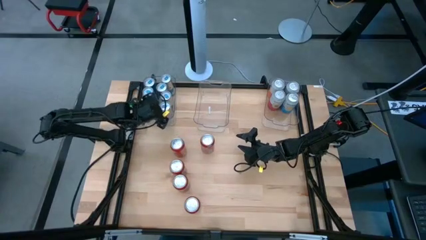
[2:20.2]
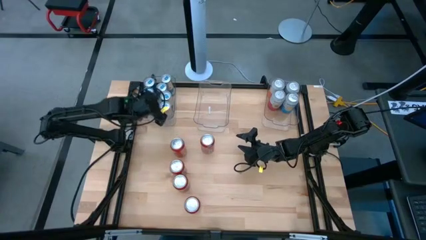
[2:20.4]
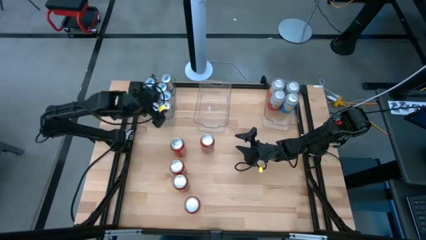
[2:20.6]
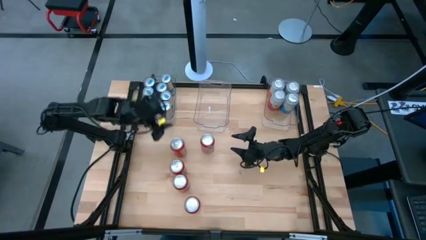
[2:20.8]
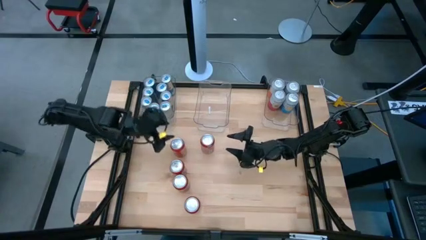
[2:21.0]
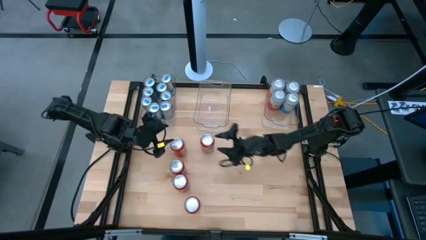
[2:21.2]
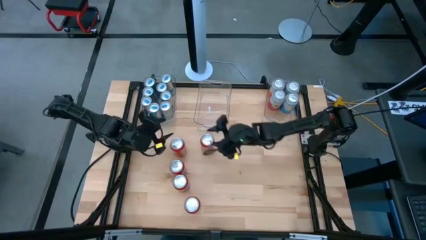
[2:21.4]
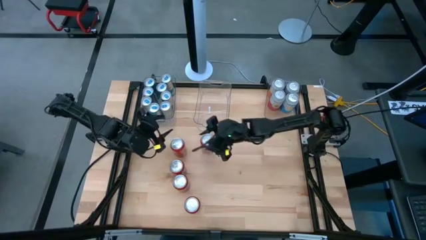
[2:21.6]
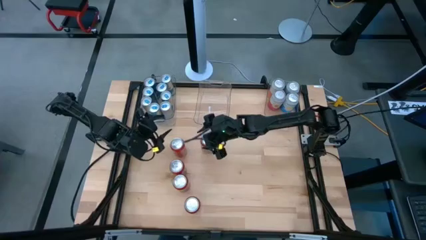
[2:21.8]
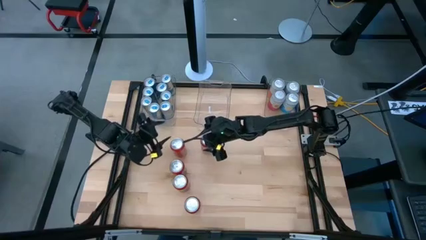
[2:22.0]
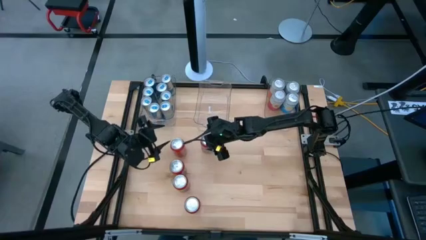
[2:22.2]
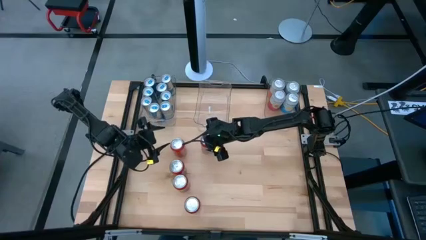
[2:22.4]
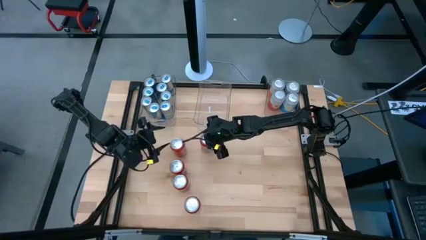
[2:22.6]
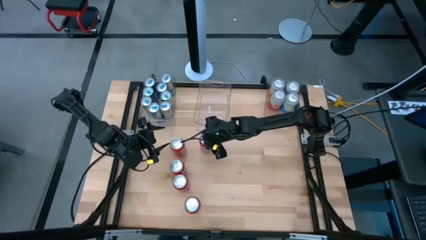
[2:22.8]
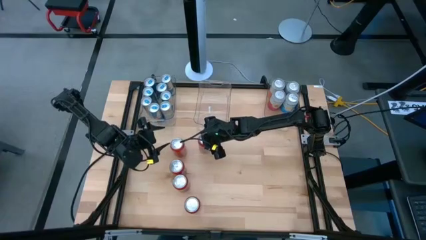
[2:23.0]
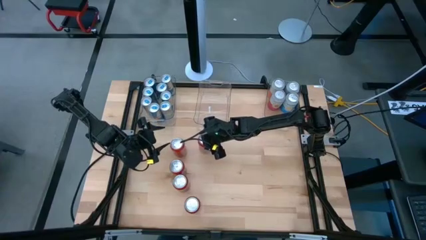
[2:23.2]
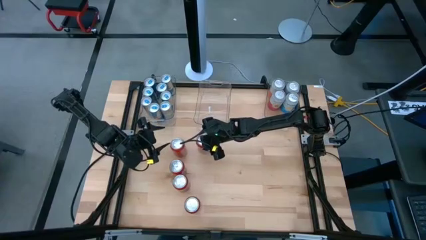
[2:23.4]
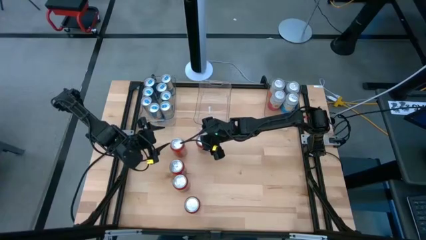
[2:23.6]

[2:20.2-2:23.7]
Task: Sort soda cans
Put the blue soda can into the left transparent bin

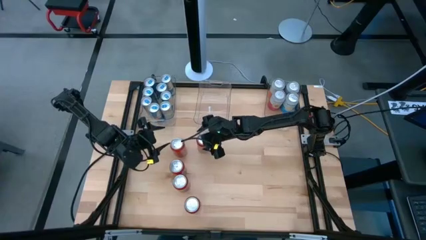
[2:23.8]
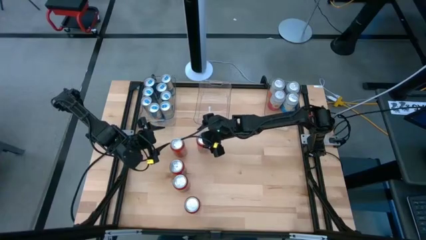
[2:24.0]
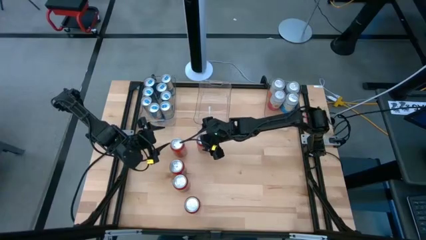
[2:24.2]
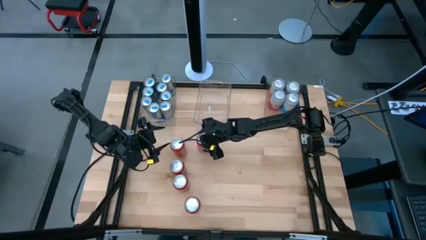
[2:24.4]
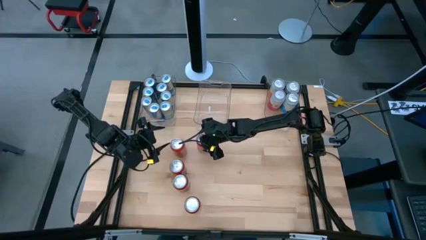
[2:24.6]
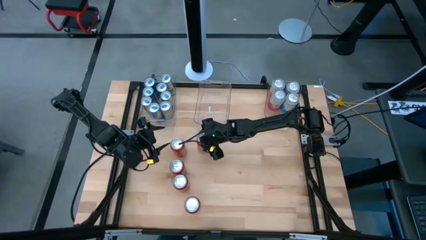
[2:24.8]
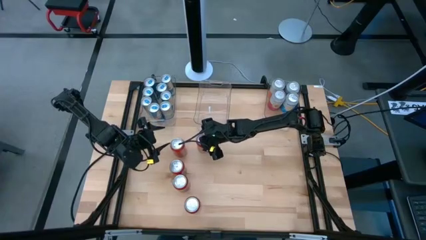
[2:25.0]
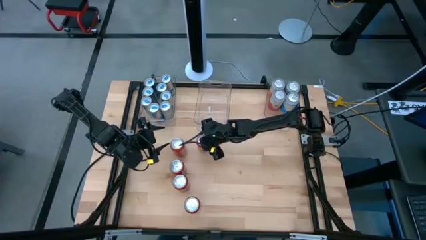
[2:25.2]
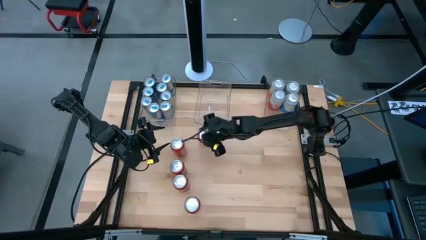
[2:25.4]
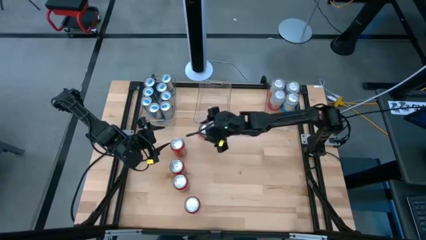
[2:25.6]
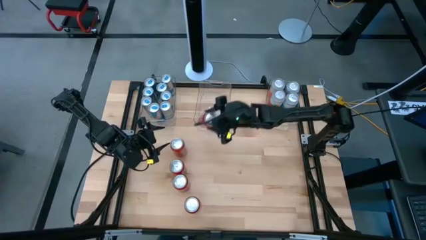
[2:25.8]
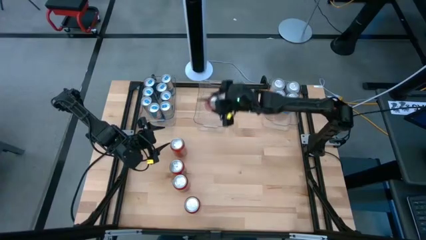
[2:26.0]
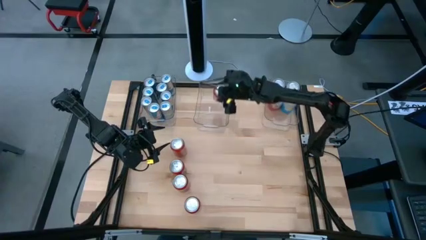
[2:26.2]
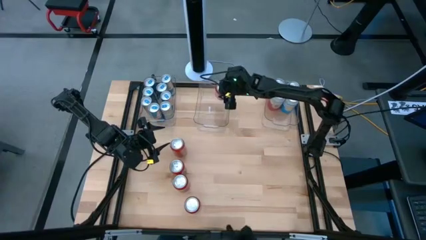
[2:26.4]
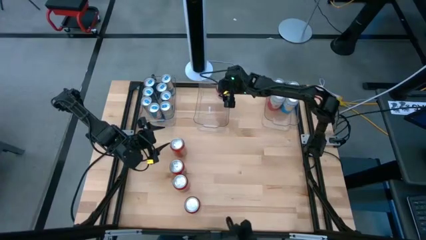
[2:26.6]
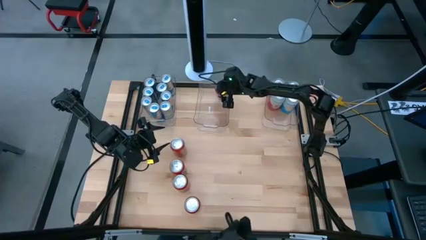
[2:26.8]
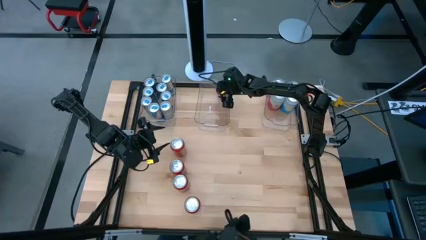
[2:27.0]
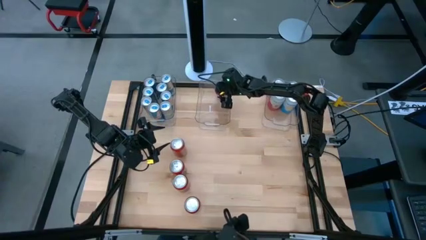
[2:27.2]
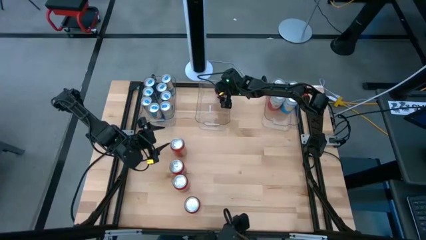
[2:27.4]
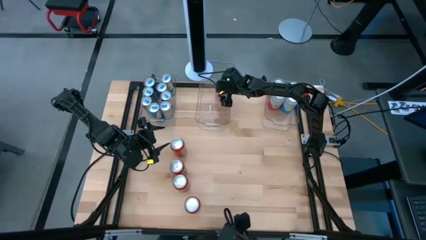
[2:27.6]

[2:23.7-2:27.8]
Put the red soda can into the center transparent bin

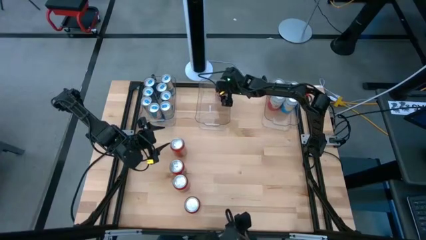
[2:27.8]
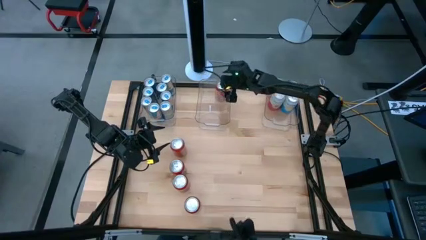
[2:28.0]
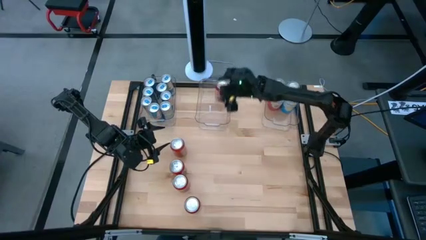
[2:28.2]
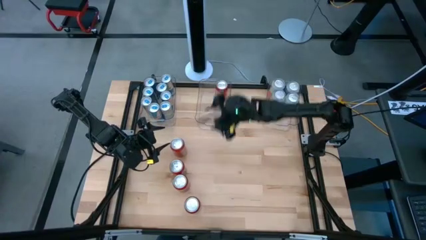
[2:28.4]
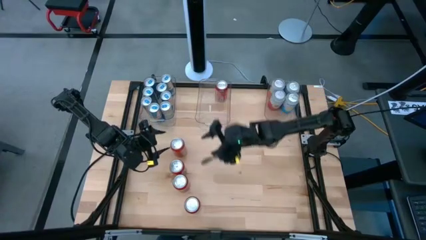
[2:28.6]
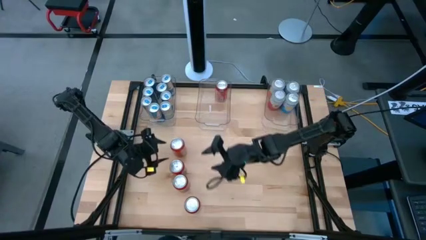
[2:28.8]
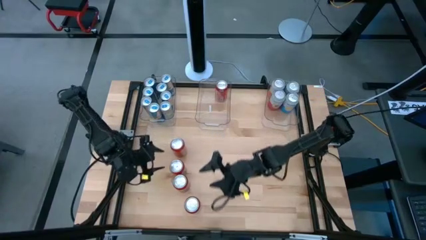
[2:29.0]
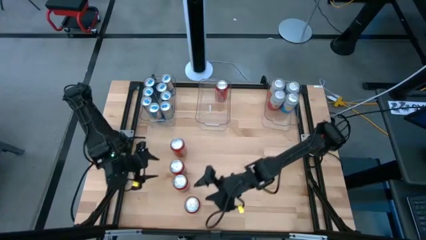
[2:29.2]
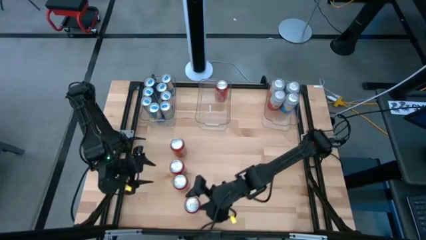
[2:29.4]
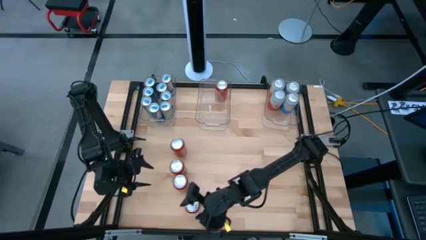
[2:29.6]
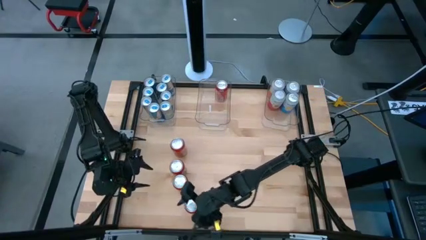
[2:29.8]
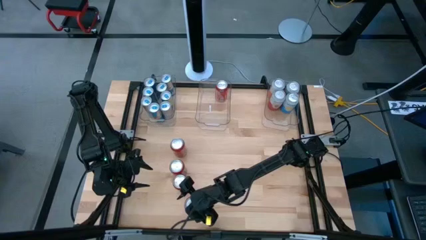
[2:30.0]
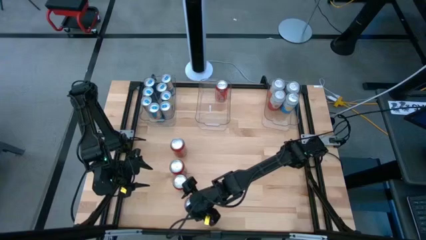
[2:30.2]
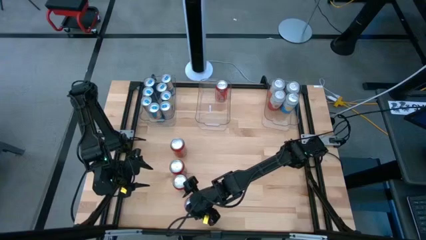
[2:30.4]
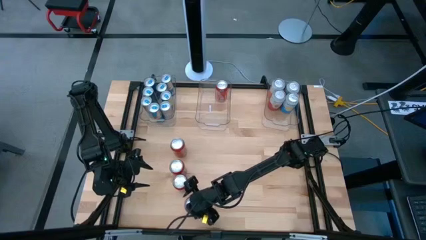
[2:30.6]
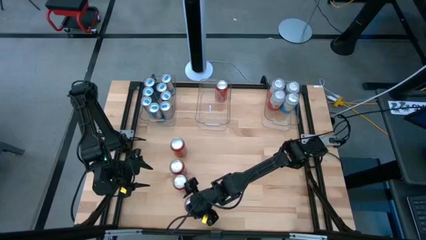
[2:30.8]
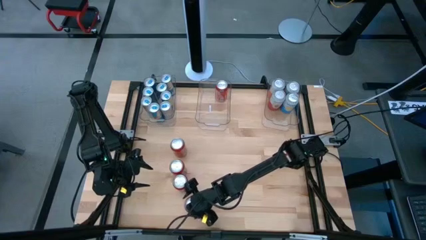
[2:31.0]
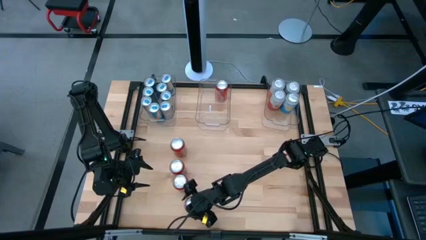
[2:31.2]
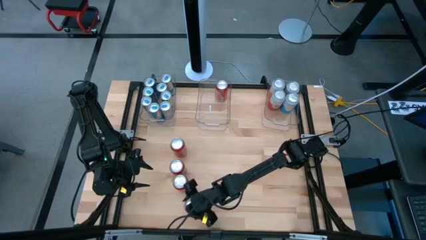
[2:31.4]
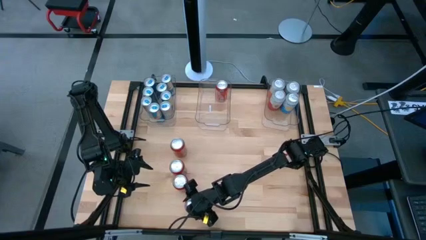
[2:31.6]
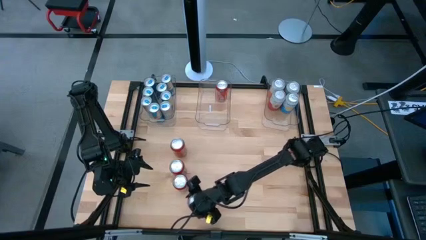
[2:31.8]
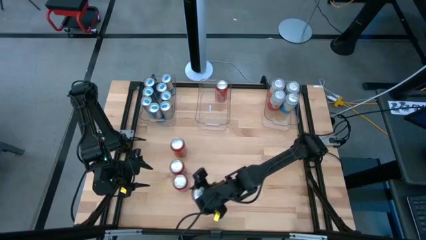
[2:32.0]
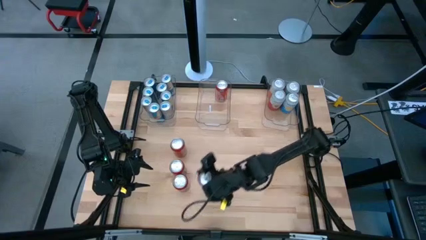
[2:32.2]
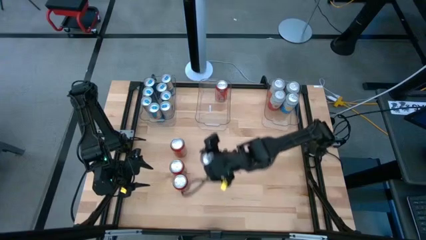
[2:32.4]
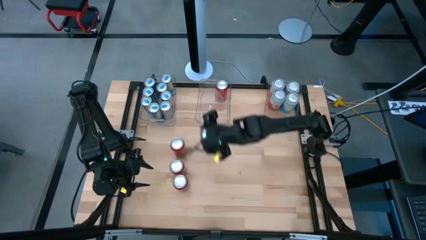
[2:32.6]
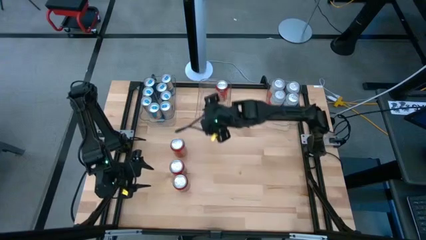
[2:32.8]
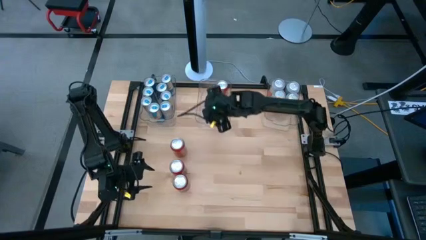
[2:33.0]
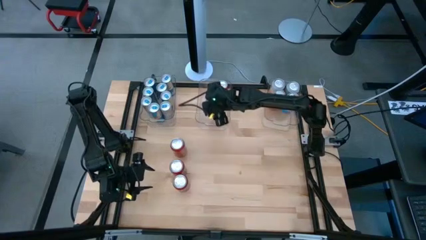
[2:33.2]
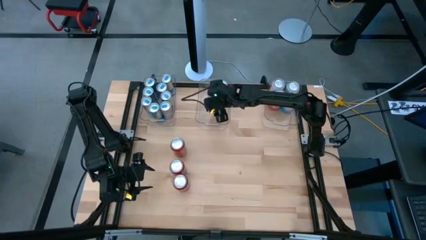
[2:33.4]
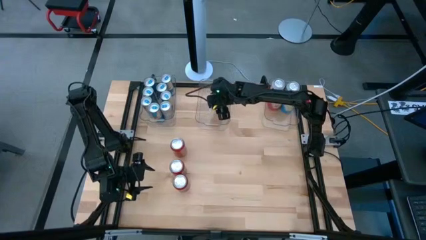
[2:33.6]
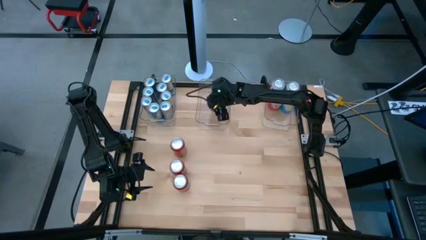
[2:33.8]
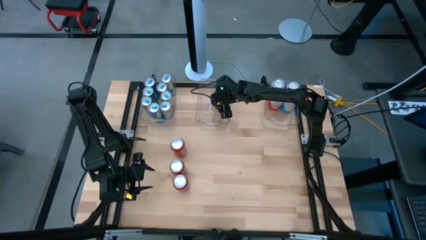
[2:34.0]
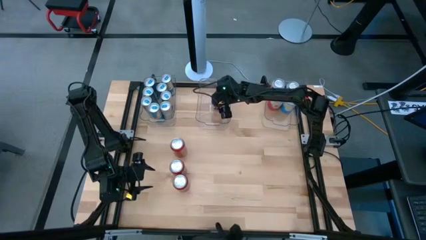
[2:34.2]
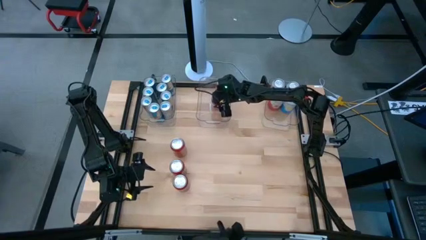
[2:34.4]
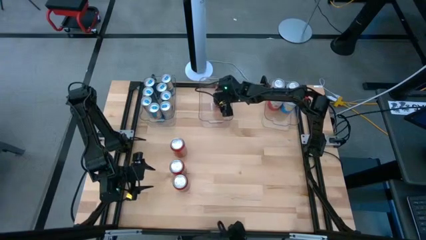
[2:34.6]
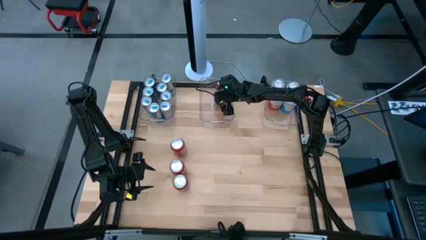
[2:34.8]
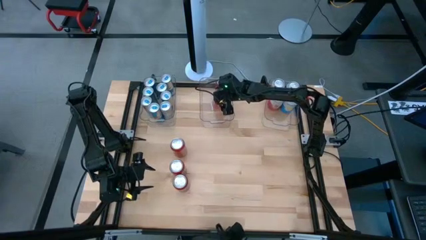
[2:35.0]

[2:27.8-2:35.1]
Put the red soda can into the center transparent bin

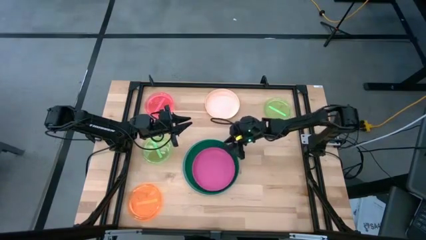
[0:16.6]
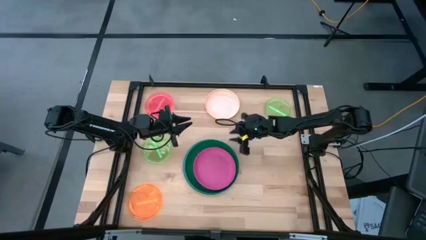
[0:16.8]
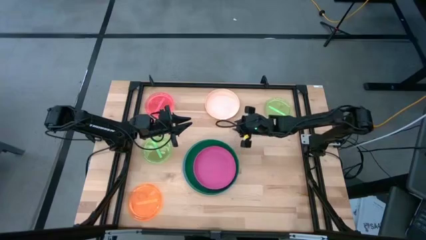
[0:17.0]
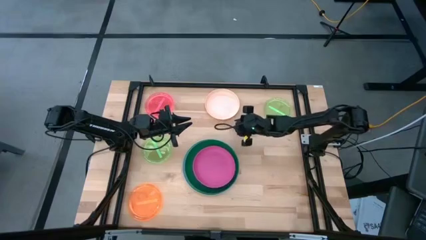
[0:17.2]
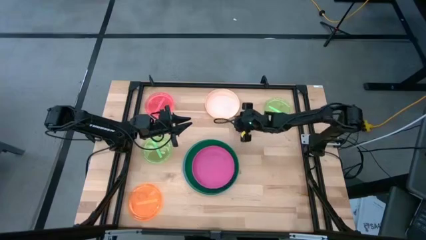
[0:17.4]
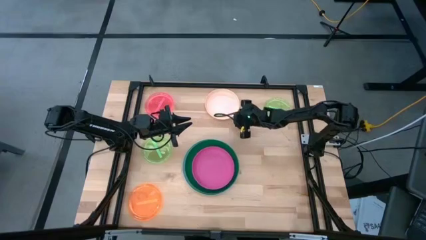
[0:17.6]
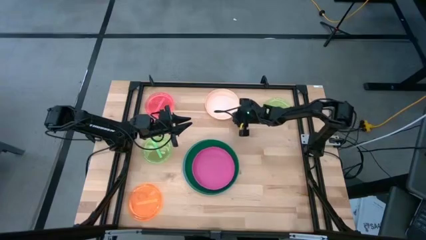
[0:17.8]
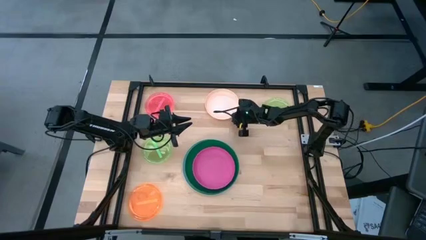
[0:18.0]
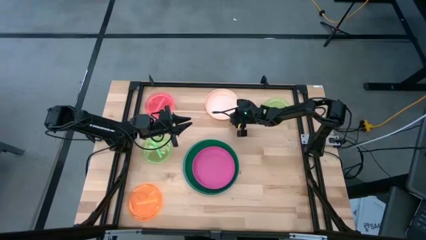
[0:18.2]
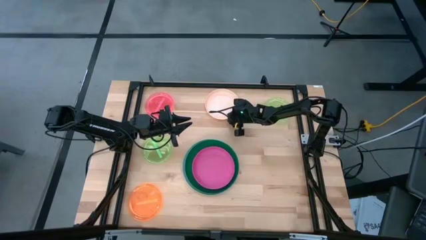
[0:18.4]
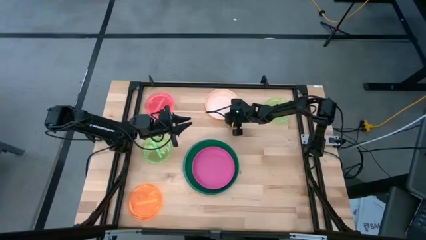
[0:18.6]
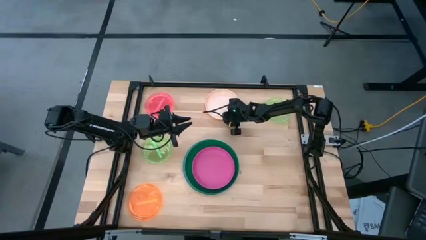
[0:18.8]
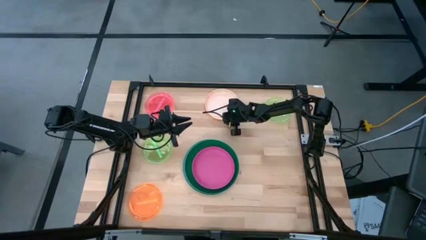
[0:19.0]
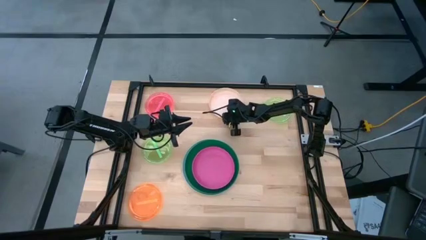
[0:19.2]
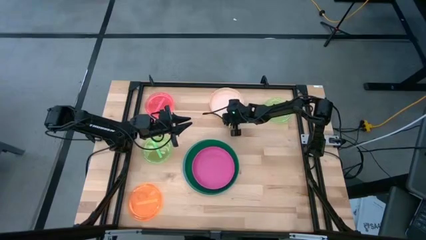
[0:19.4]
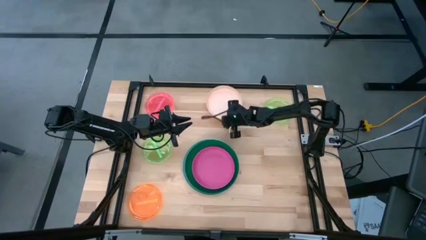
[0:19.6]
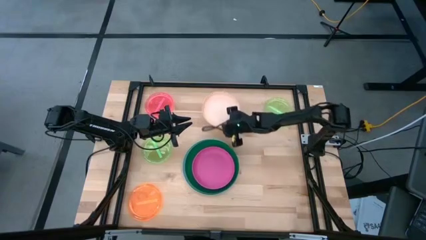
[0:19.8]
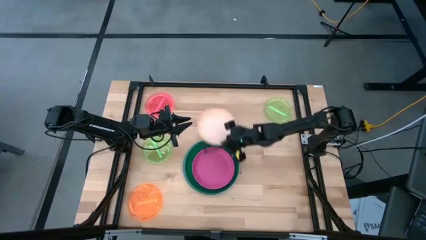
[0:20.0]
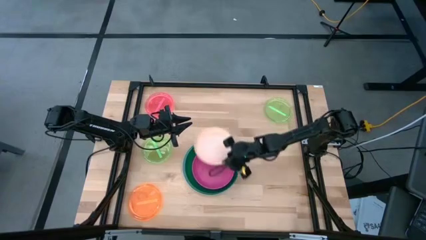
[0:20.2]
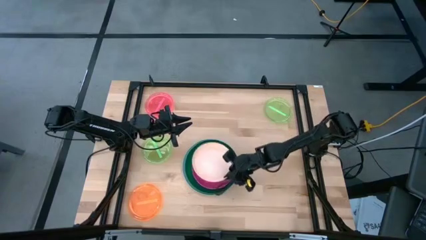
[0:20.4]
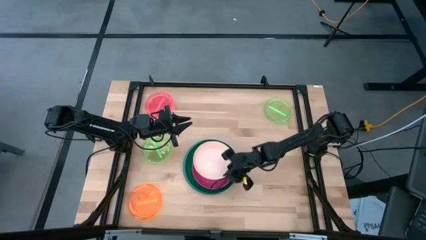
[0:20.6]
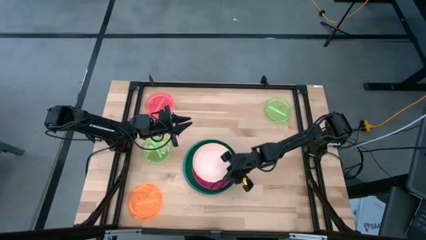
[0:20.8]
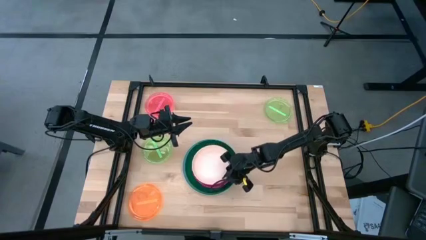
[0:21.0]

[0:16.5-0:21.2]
Task: Stack plastic plates
Stack the orange plate on top of the pink plate
